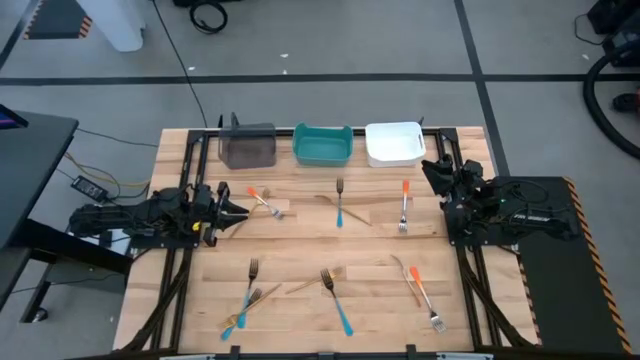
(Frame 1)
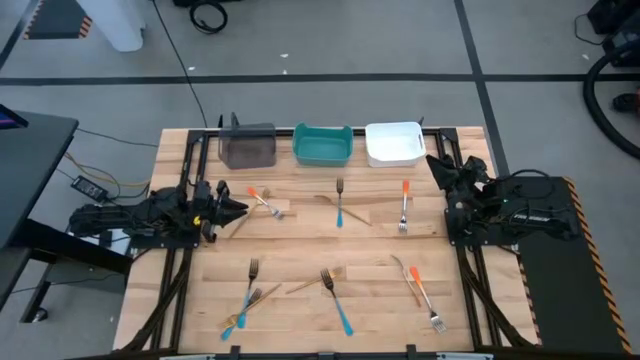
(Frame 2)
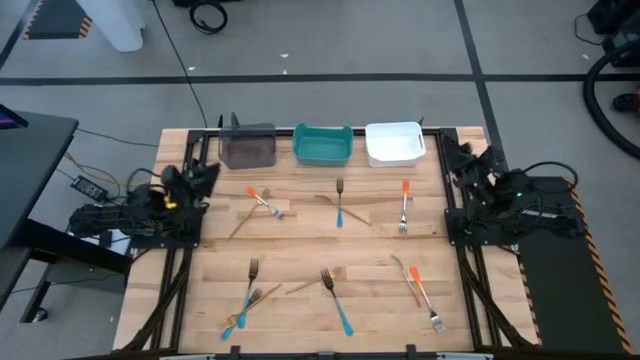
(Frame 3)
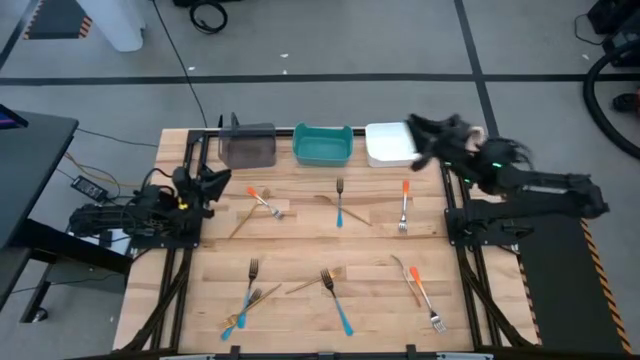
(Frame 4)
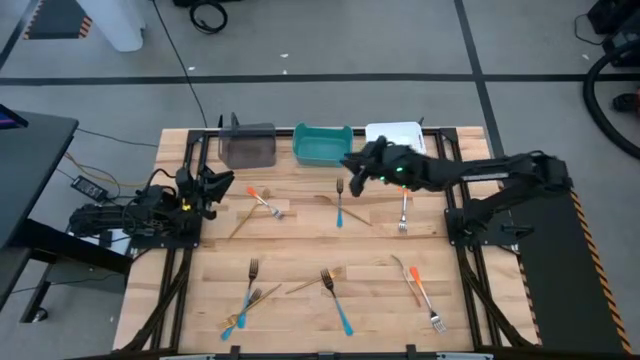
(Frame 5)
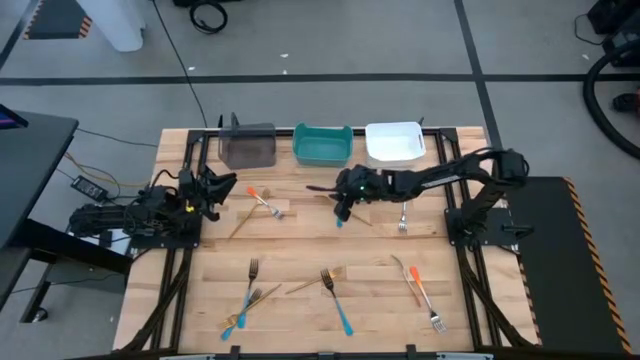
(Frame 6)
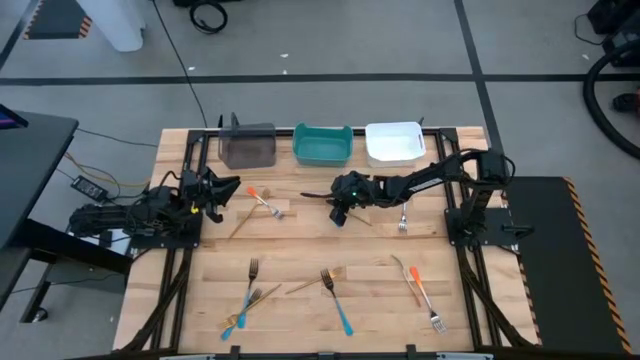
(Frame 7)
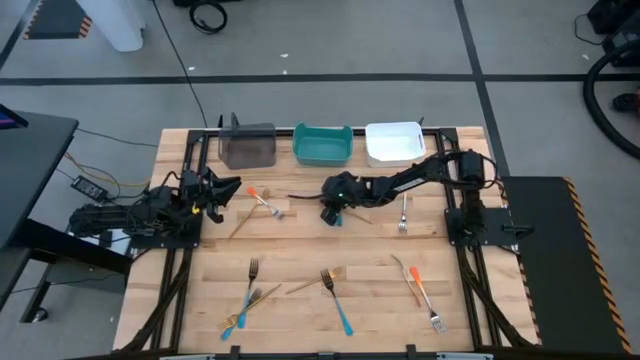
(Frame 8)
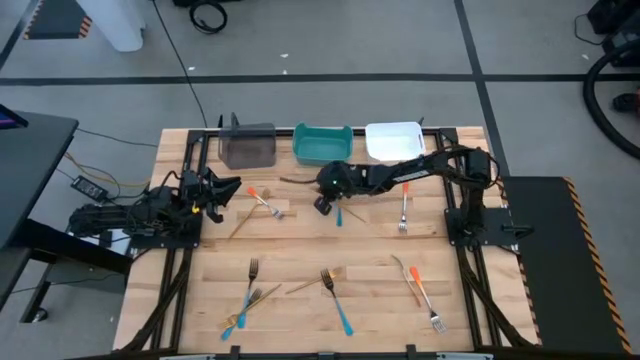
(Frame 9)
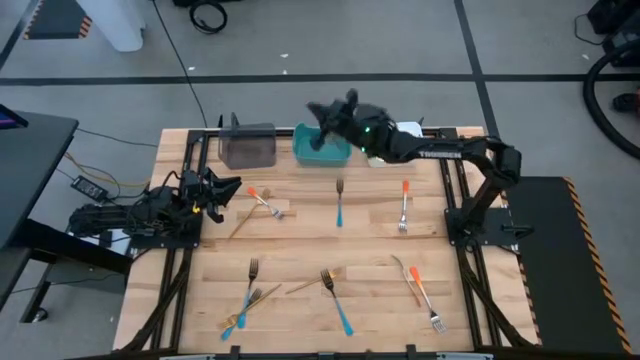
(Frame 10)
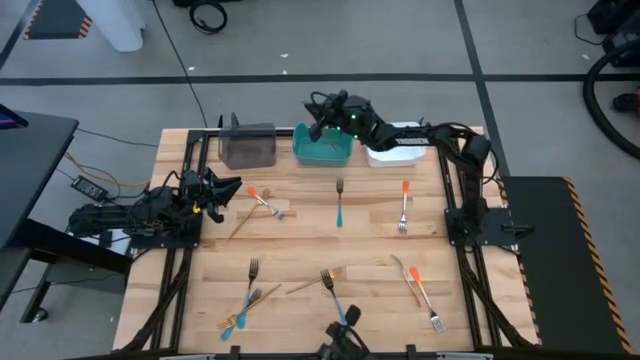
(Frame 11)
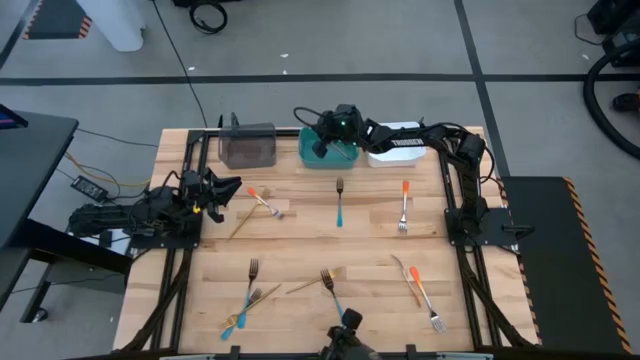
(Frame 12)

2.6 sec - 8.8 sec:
Task: Sort silverware by color (type)
Put the gold fork into the green bin

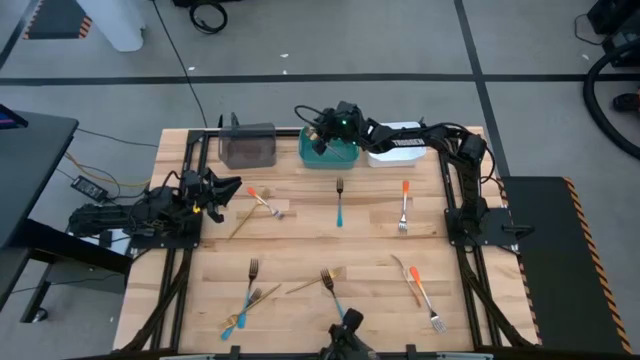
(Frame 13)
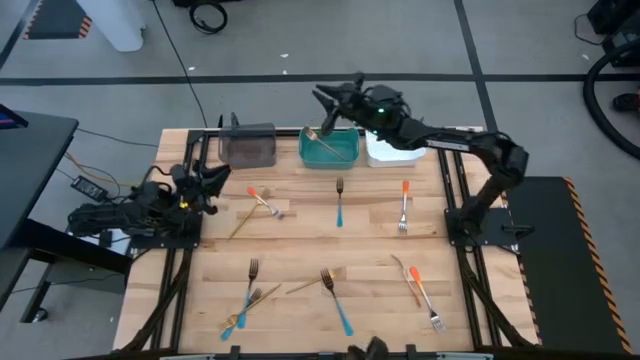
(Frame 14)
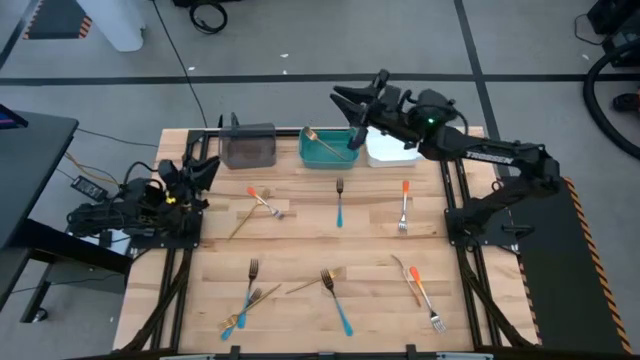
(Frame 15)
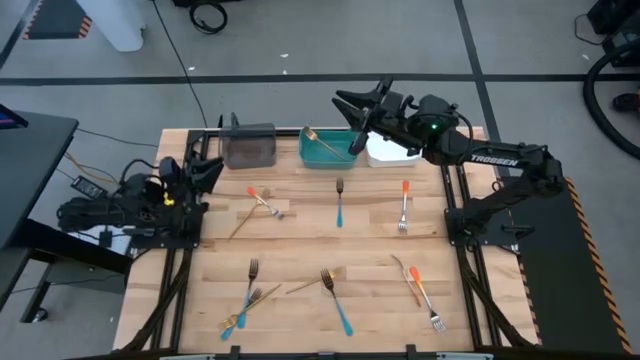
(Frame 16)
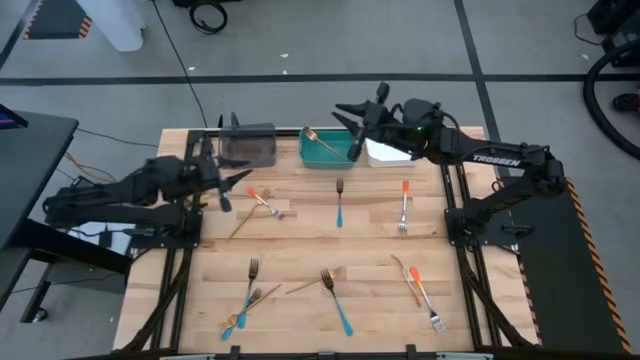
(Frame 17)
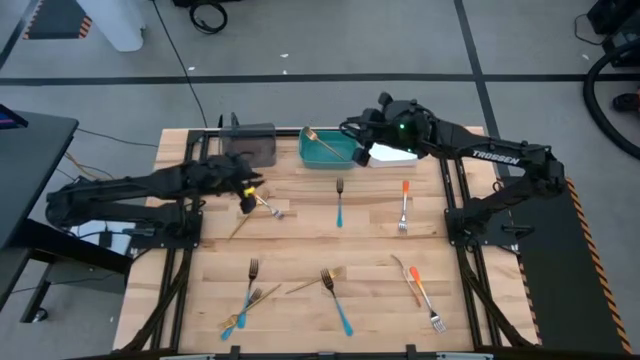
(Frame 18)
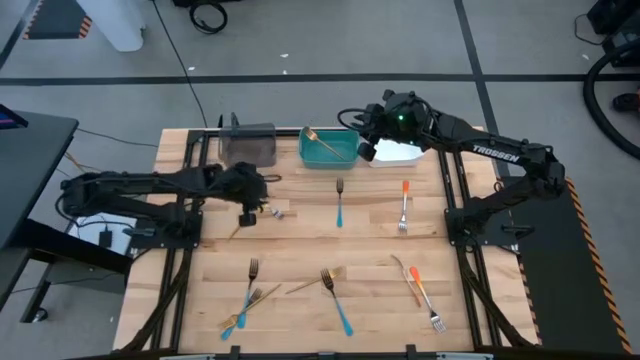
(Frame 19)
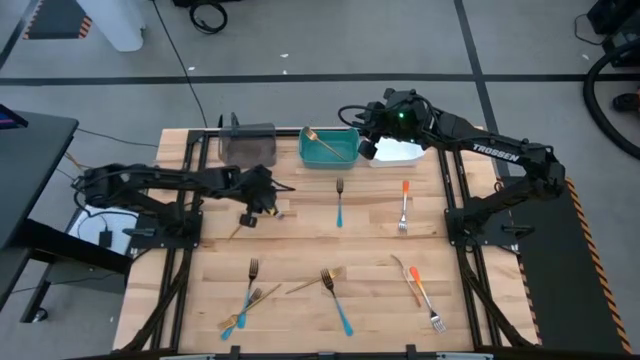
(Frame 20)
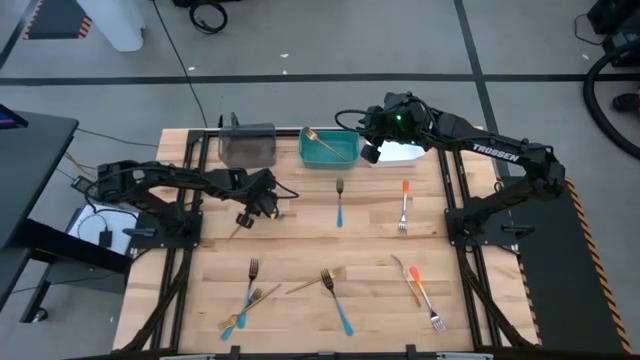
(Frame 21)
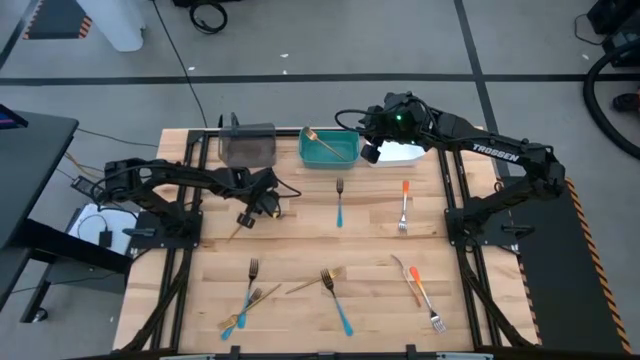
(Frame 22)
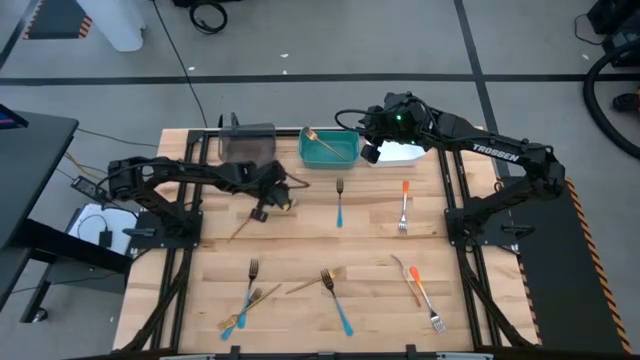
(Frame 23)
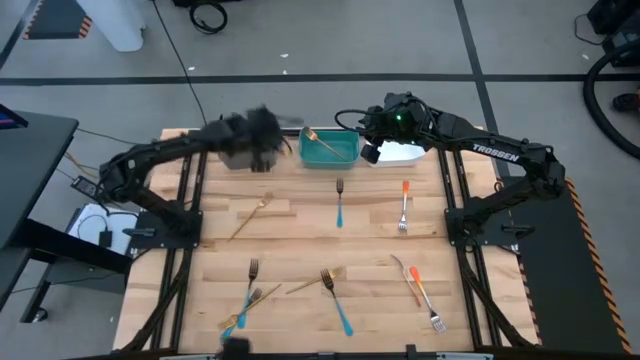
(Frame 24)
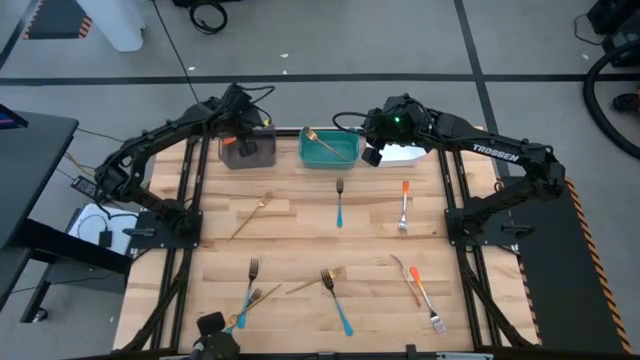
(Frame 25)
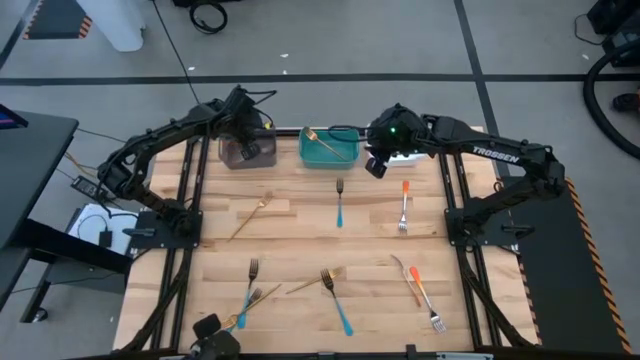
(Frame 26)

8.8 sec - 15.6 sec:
Put the orange fork into the black bin

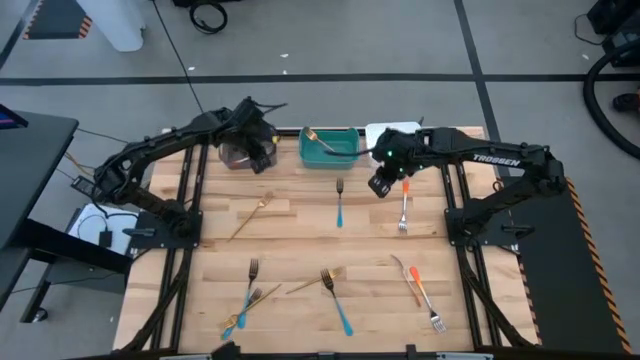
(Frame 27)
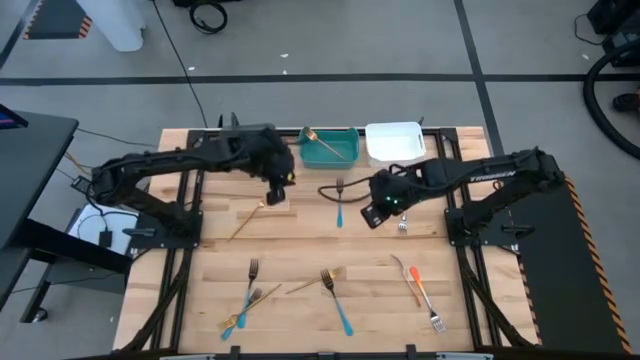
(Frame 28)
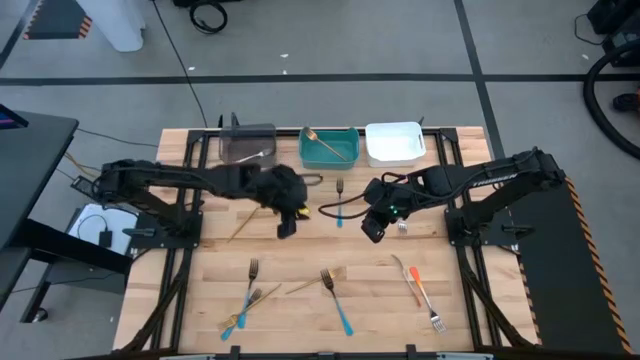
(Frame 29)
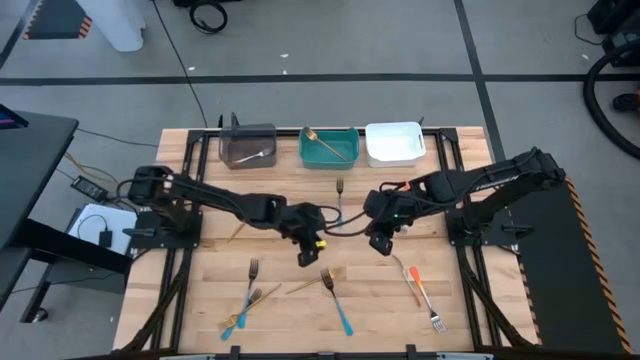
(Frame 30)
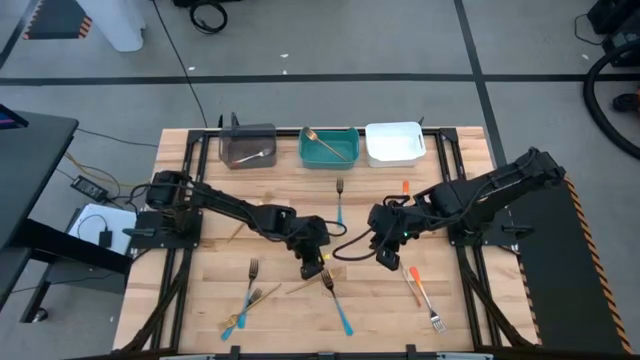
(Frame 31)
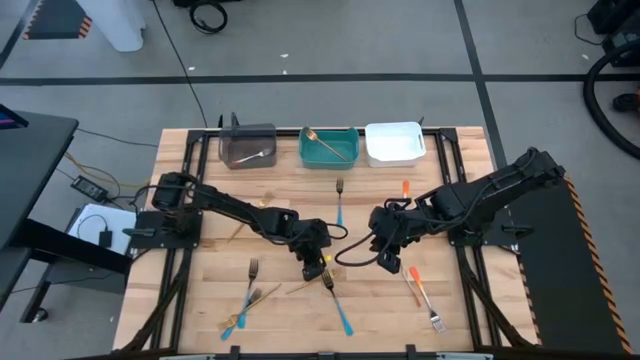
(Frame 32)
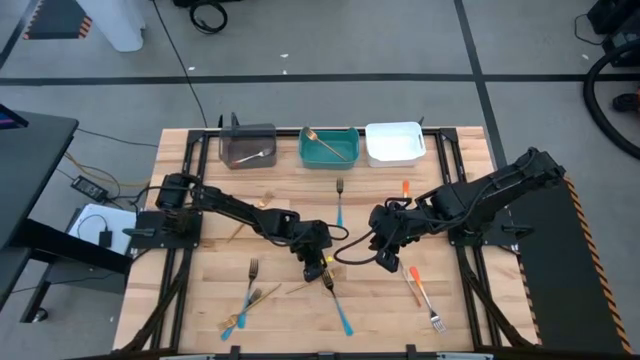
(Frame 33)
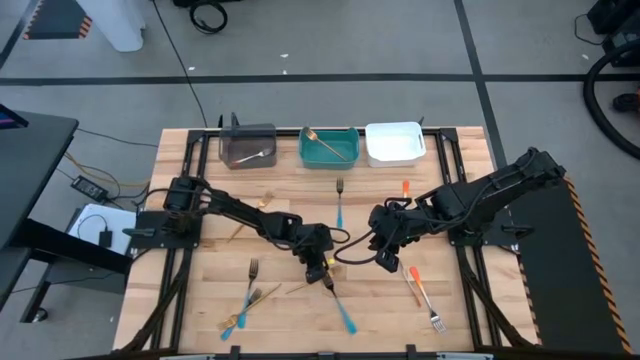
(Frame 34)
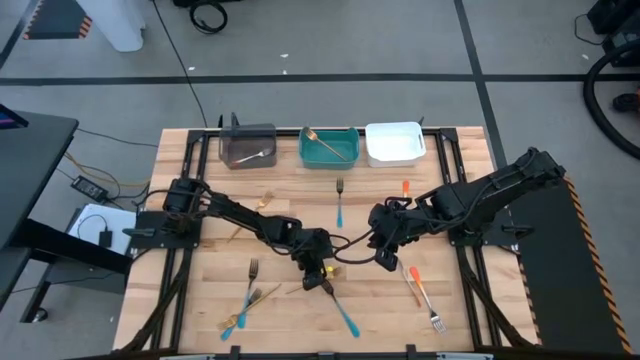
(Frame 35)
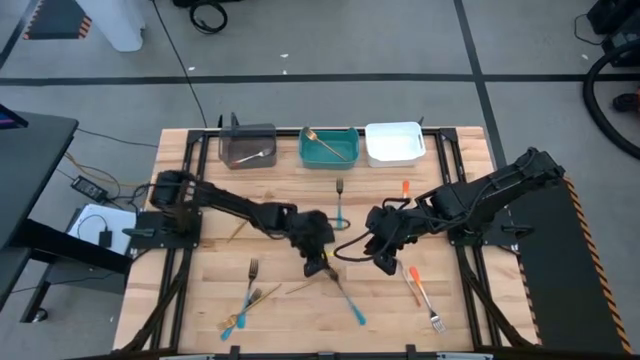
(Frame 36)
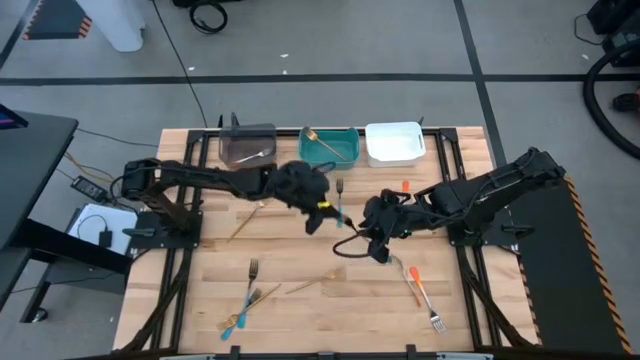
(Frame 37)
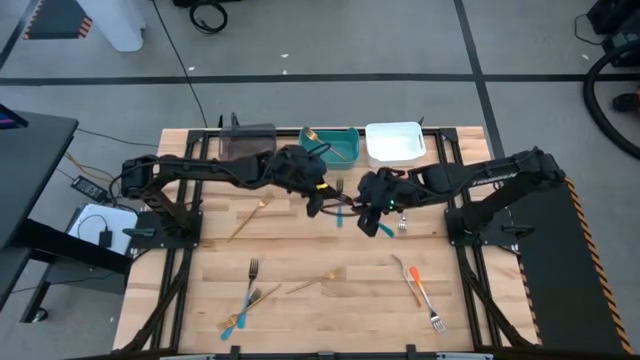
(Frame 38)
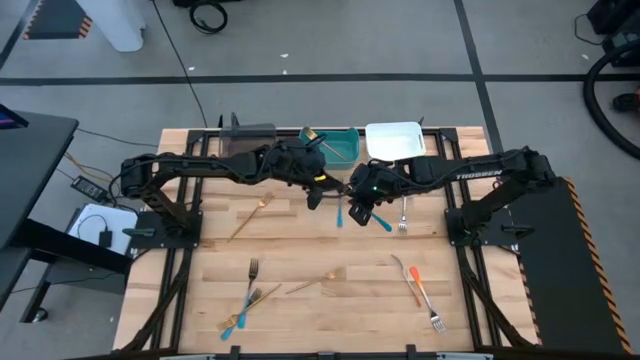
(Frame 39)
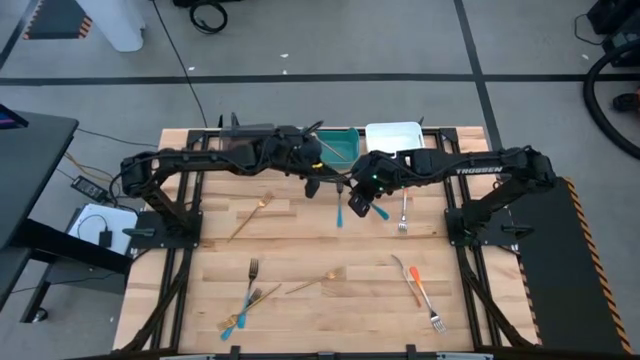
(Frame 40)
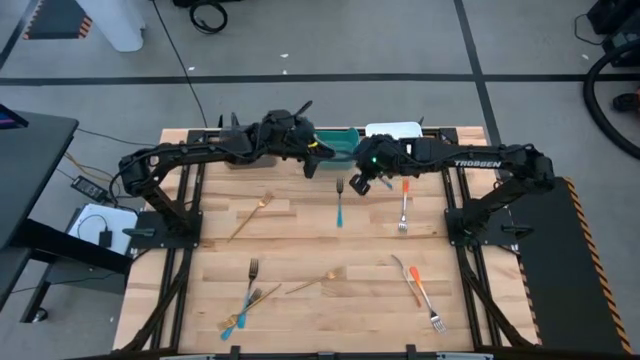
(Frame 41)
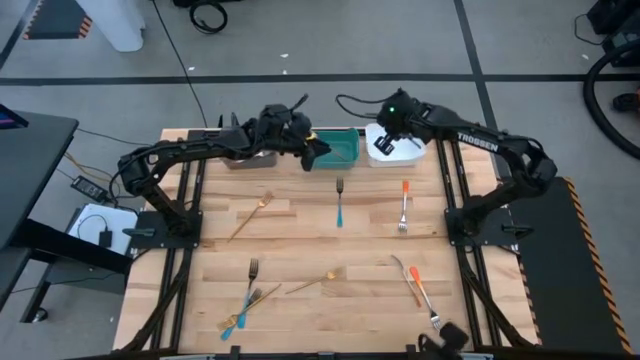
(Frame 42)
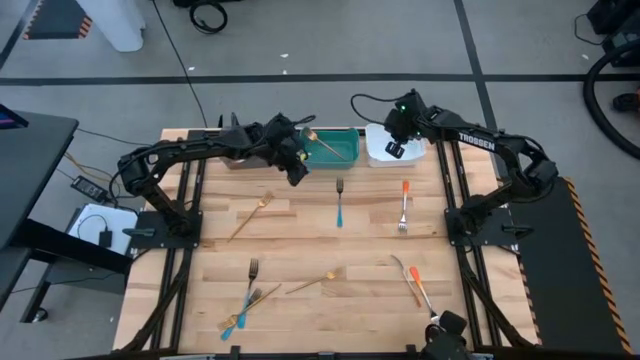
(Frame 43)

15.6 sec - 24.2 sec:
Put the blue fork into the white bin
